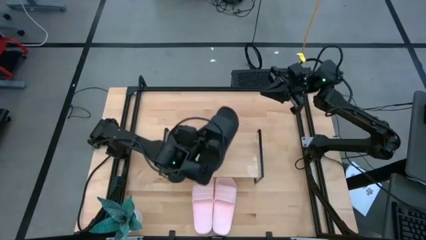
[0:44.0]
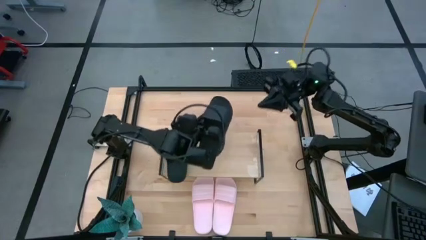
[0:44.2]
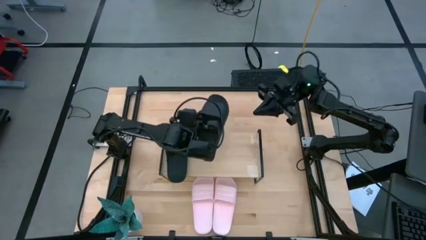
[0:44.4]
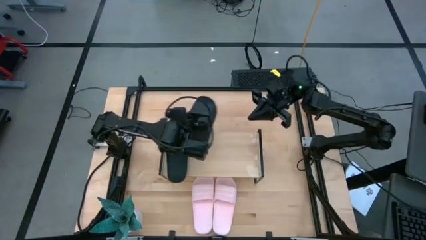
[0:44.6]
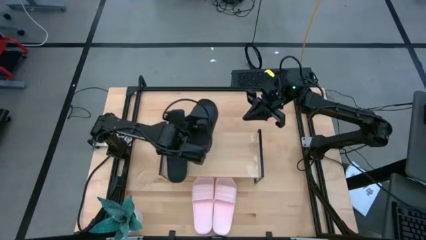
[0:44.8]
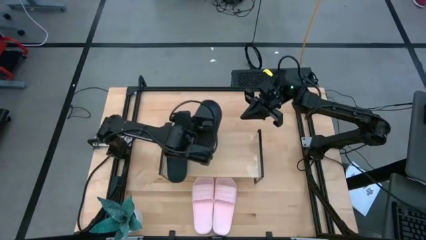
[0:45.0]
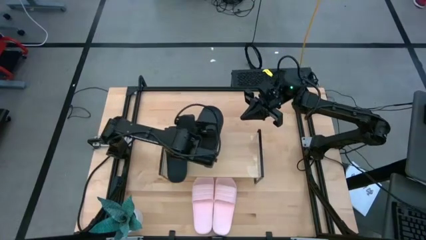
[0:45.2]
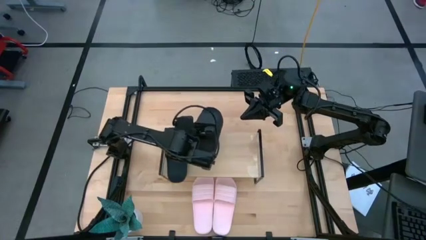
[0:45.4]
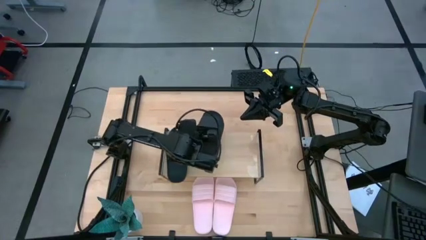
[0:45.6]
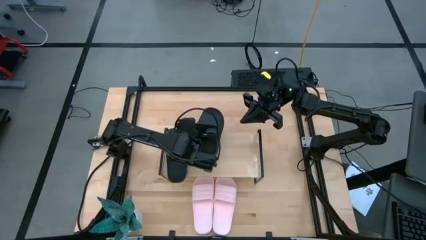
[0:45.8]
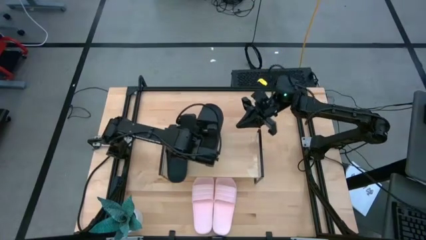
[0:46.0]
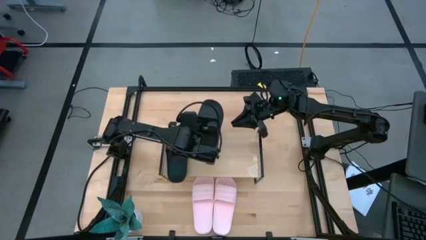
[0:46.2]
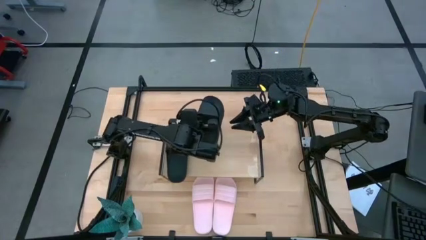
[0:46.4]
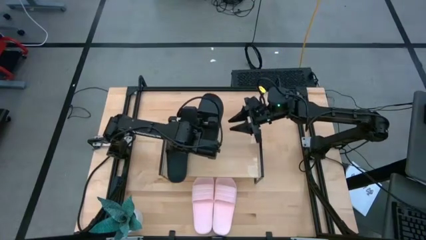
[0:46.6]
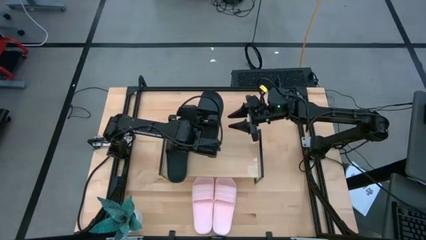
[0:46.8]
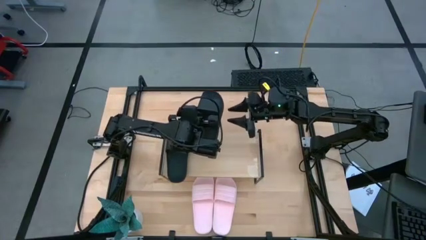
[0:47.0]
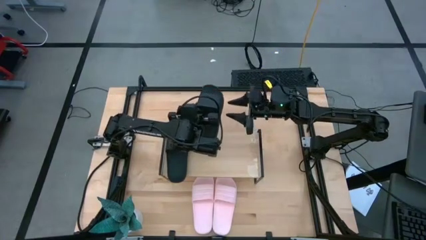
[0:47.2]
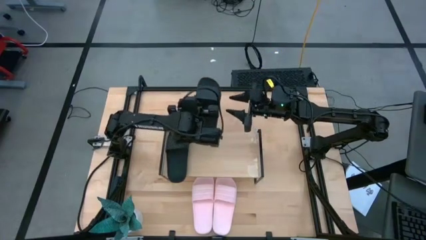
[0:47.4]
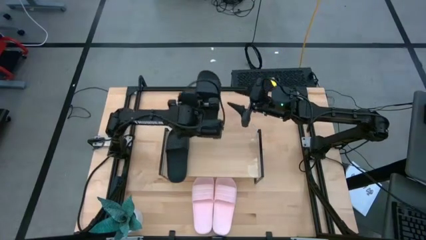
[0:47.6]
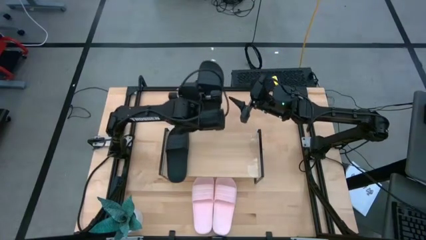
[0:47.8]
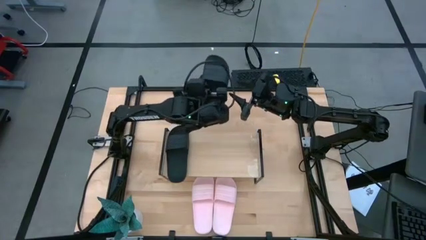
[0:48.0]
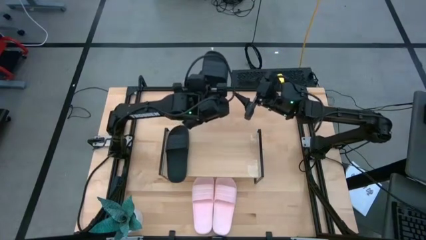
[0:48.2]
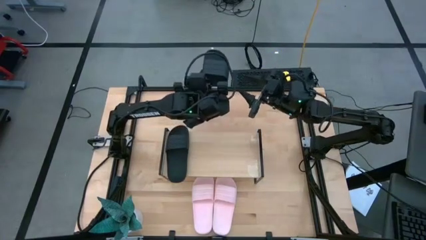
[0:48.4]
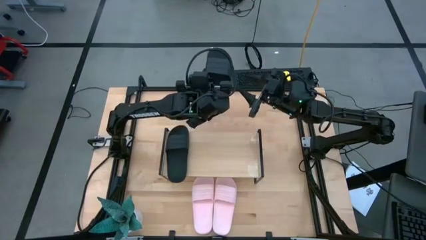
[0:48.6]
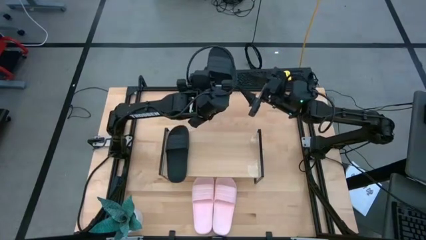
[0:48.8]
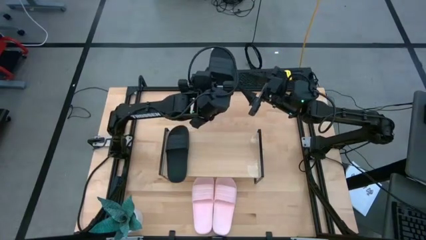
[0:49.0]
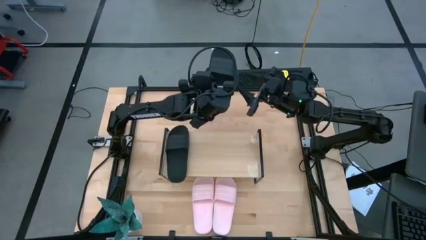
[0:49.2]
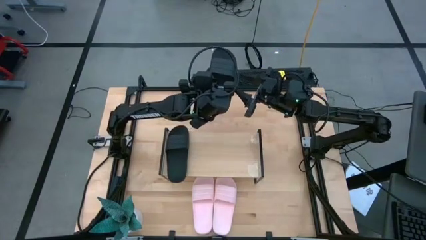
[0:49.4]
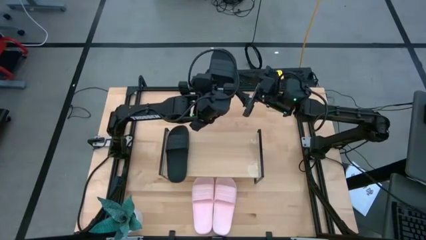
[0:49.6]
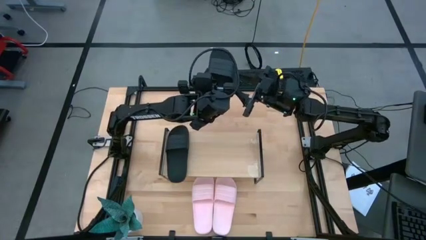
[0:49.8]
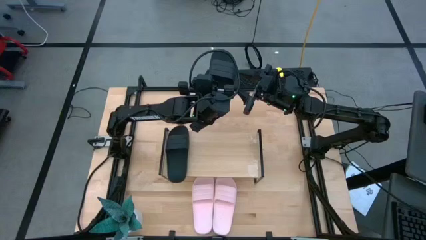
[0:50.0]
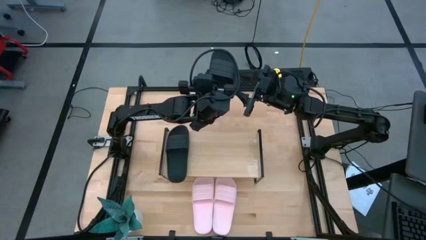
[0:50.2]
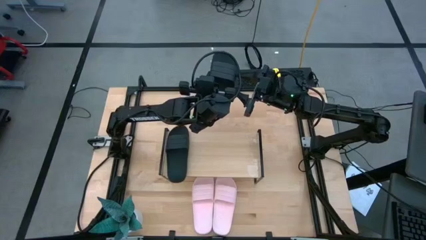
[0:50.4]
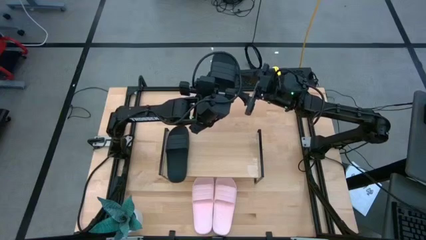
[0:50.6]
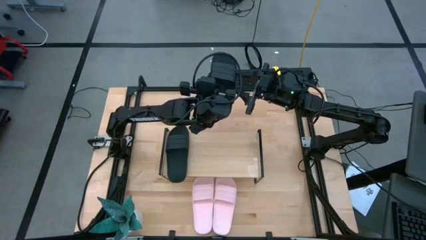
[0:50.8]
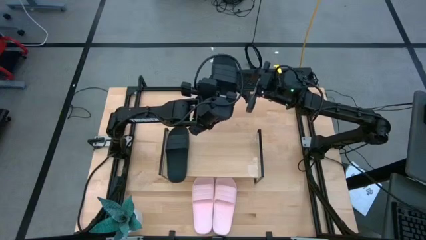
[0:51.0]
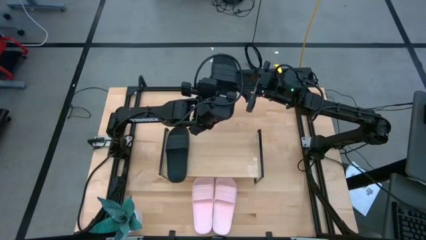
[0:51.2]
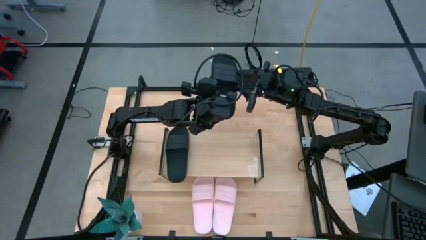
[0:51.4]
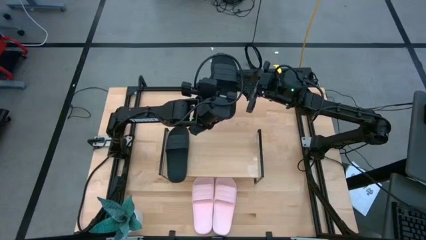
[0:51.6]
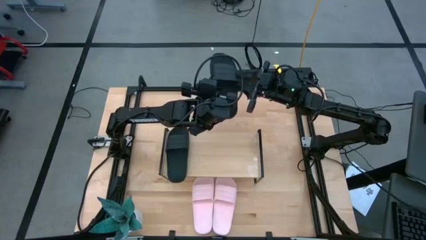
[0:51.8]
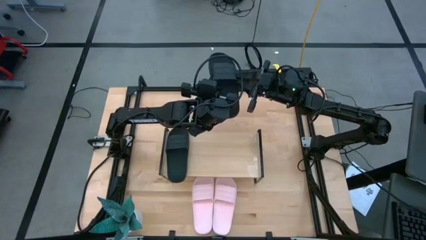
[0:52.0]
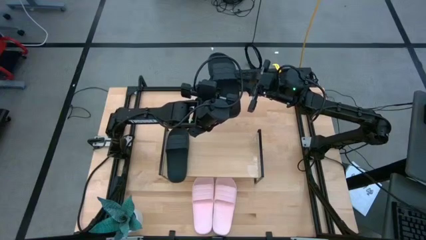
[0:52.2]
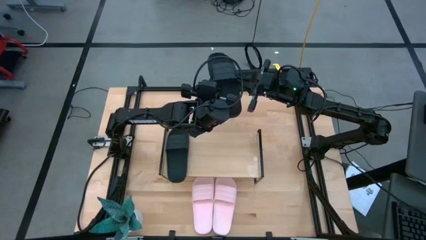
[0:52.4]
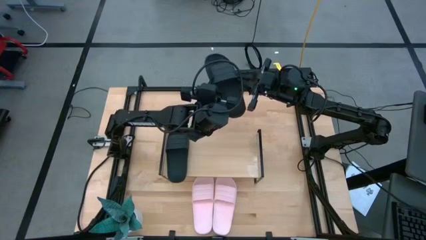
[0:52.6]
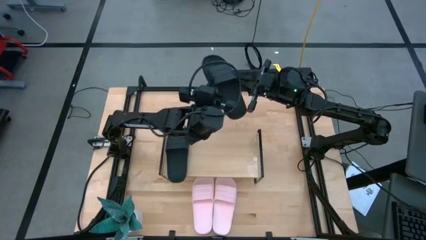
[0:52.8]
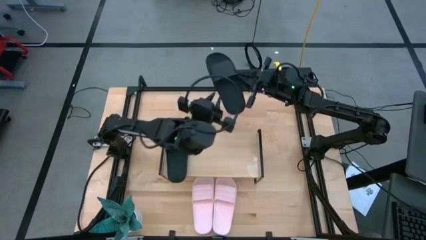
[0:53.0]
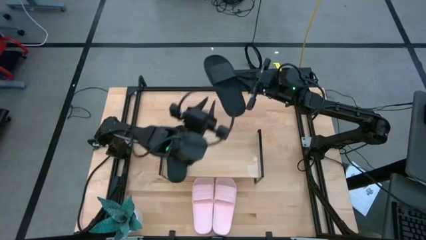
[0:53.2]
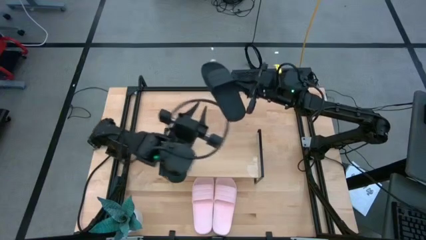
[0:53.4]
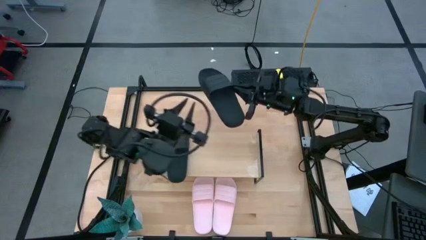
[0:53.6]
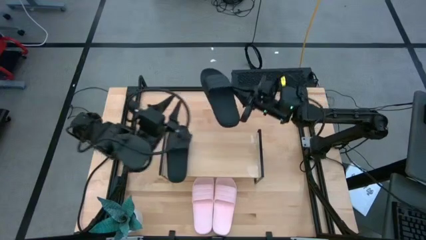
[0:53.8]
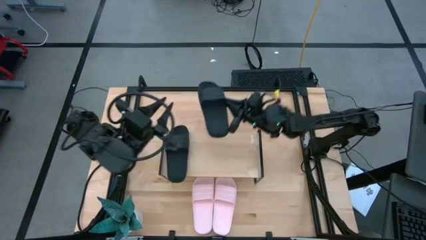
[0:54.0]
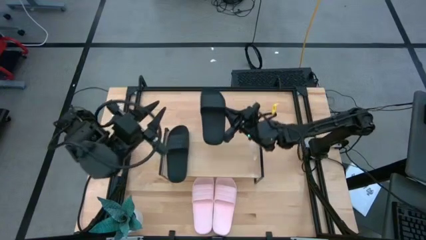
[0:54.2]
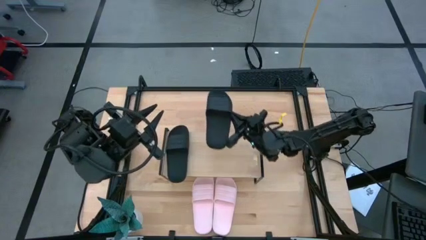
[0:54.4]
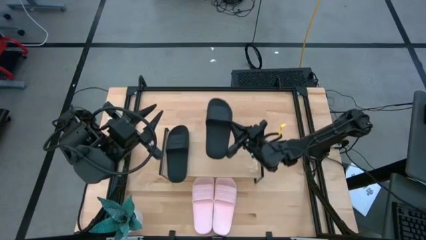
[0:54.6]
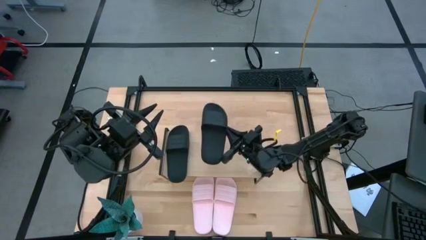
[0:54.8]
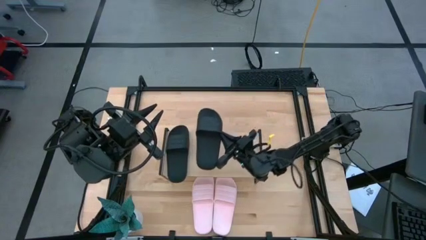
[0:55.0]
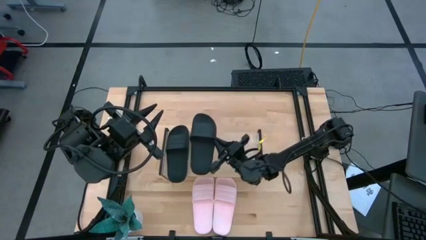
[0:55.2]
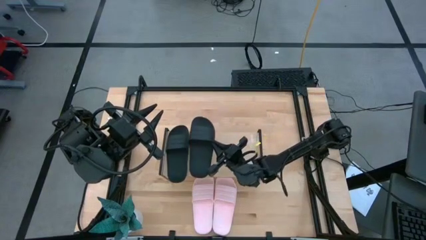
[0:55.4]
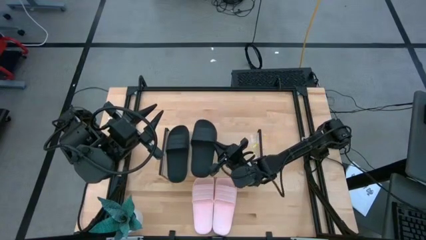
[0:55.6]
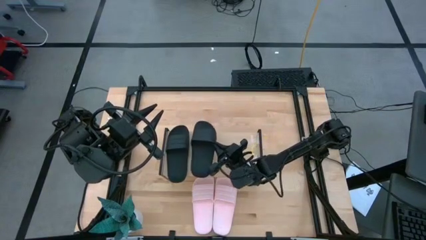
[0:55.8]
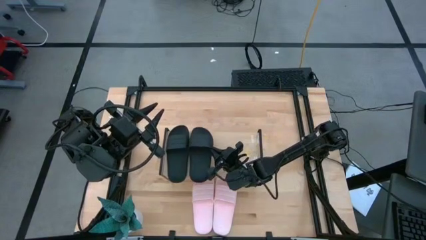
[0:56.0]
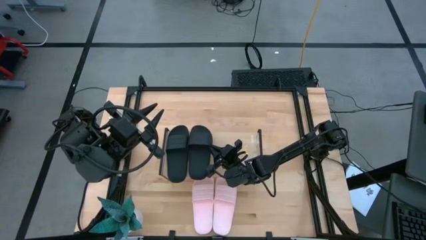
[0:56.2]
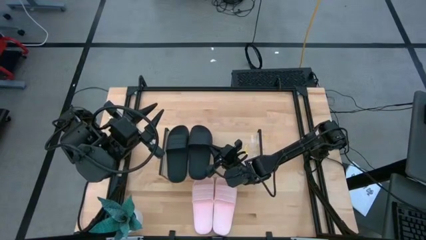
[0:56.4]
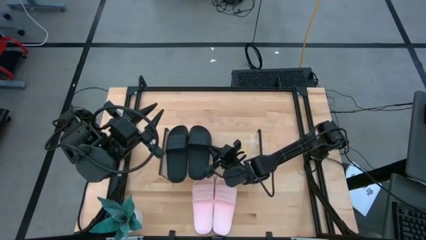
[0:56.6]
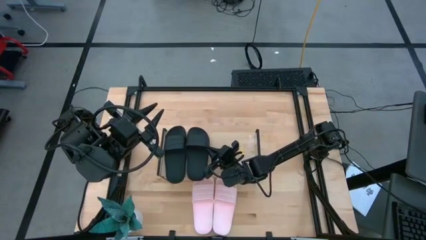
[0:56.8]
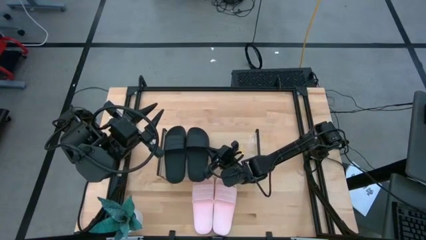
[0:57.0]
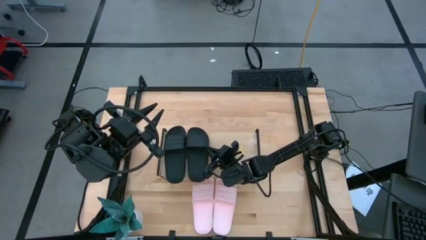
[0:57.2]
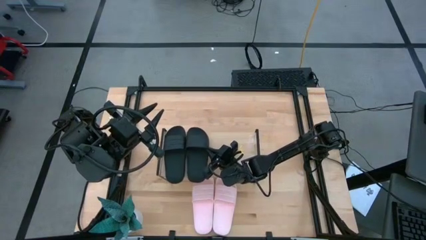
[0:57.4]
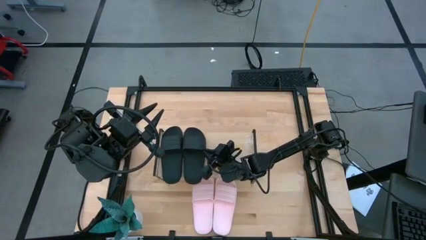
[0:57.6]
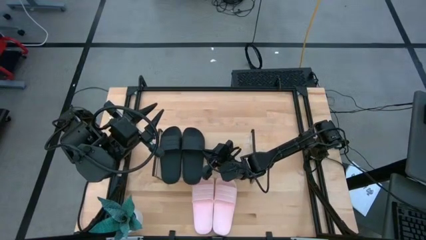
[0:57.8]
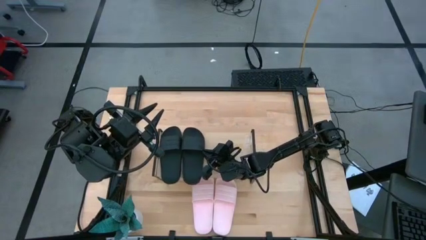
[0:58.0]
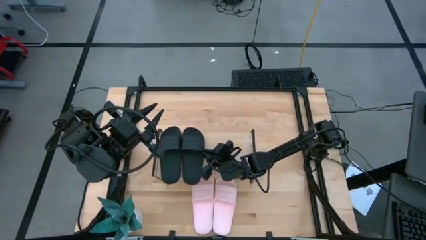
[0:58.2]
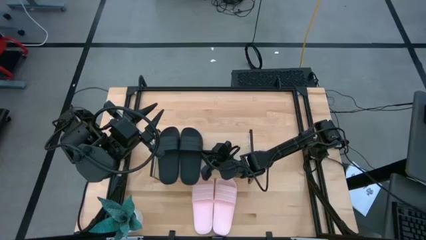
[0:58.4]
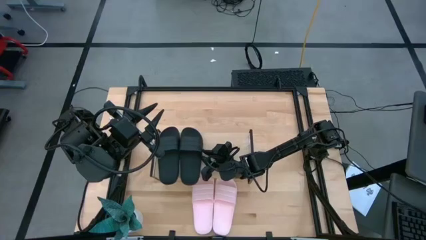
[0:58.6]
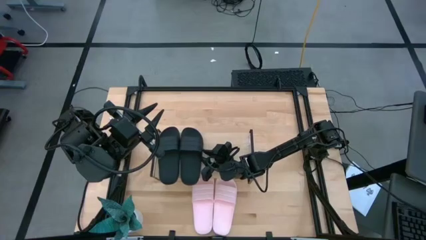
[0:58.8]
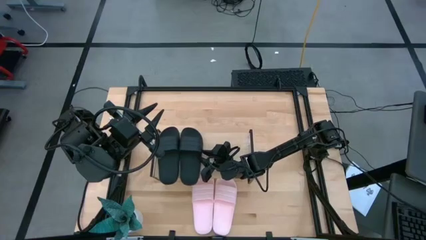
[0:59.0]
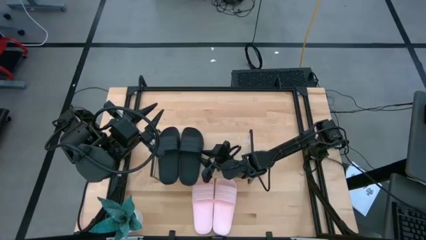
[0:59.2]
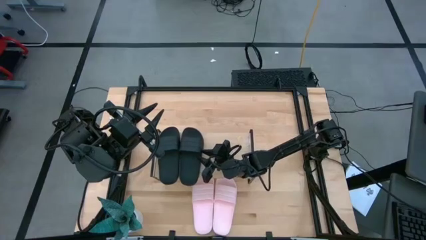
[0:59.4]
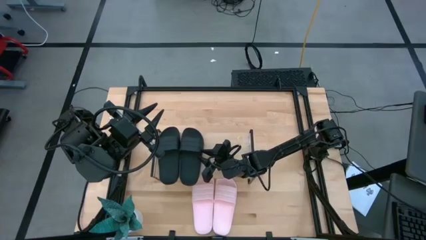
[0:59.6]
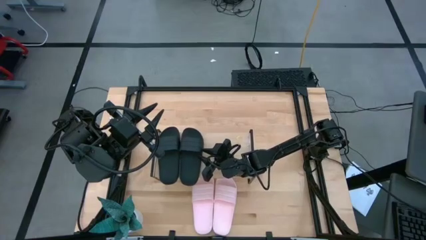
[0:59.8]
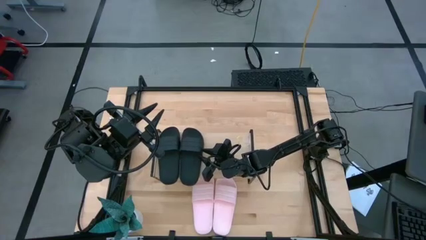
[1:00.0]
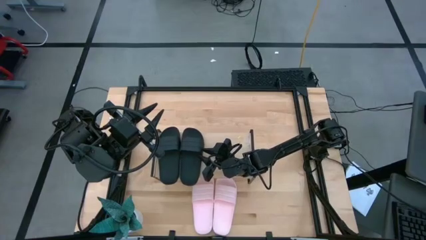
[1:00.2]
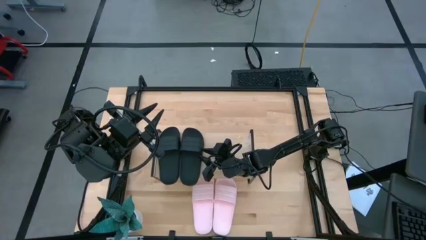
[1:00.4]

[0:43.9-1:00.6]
Task: Pick and place slides into the shelf
Put the black slide on the shelf
